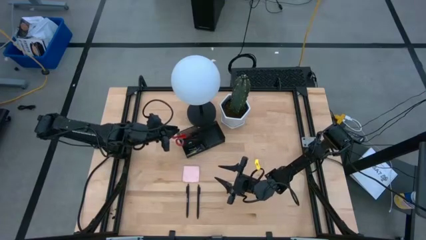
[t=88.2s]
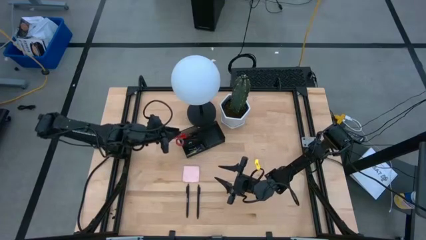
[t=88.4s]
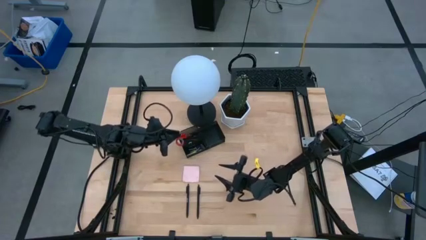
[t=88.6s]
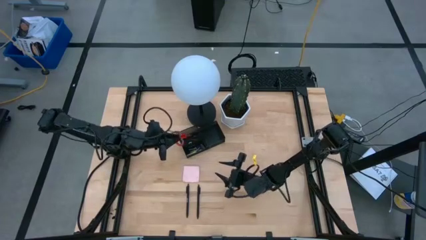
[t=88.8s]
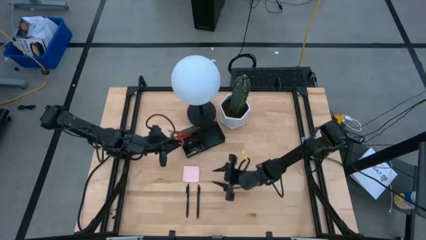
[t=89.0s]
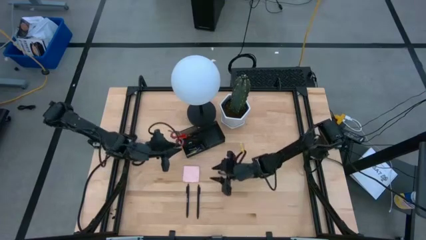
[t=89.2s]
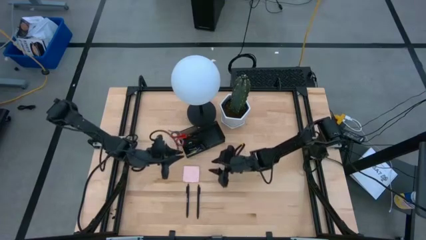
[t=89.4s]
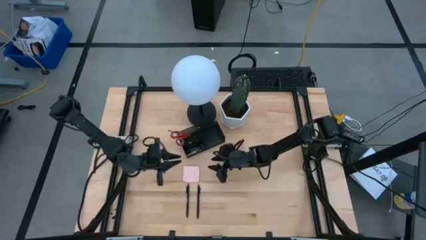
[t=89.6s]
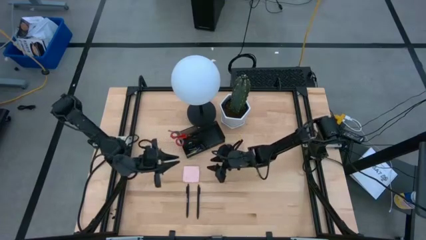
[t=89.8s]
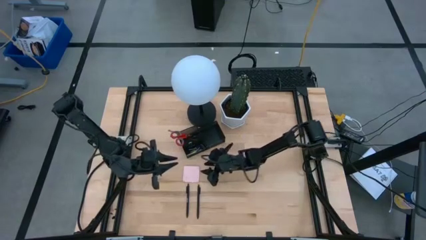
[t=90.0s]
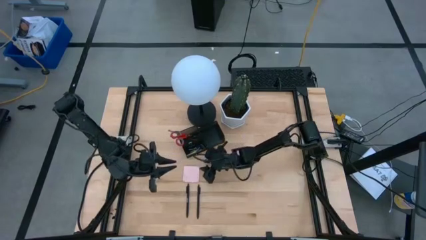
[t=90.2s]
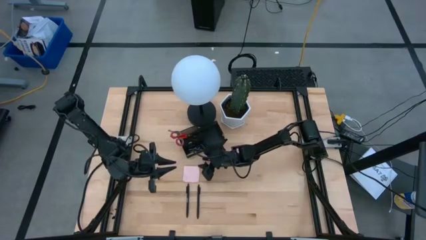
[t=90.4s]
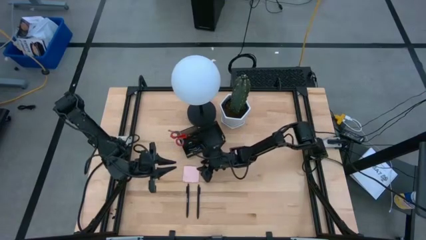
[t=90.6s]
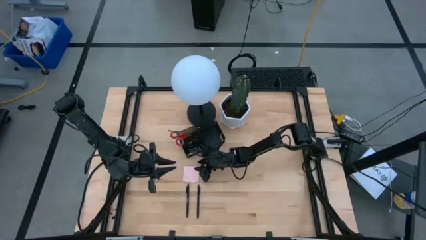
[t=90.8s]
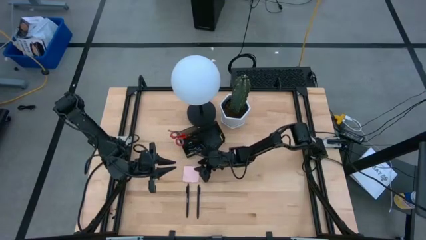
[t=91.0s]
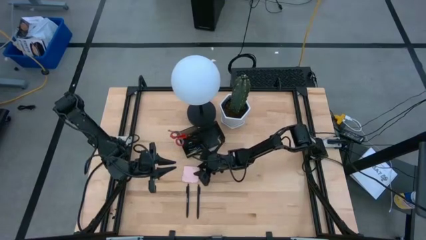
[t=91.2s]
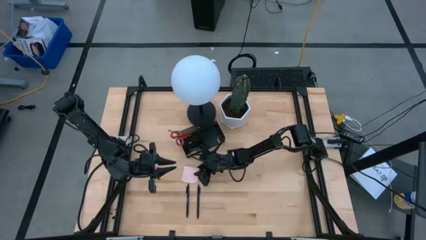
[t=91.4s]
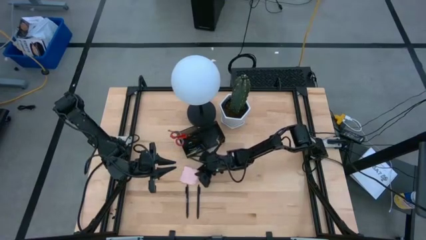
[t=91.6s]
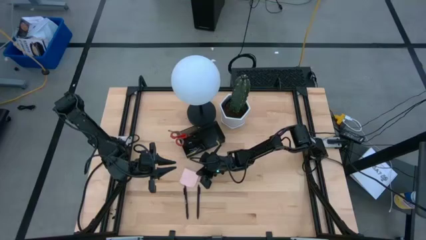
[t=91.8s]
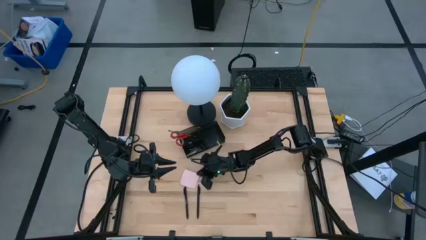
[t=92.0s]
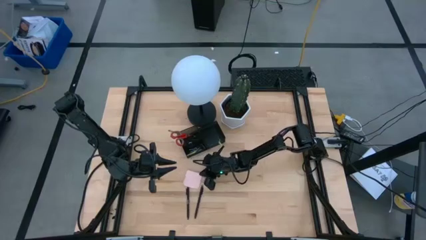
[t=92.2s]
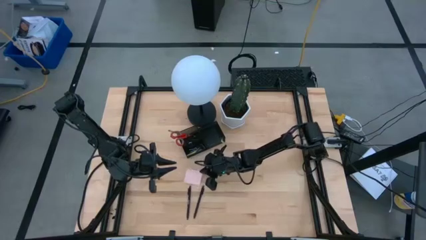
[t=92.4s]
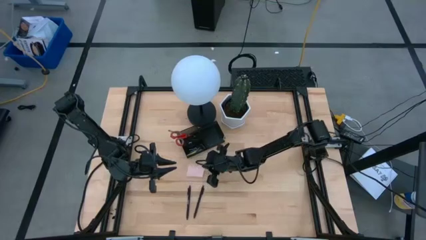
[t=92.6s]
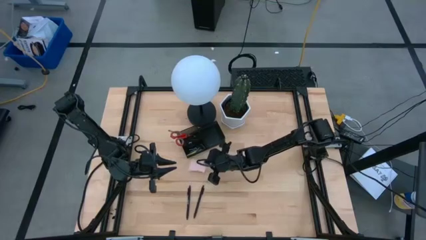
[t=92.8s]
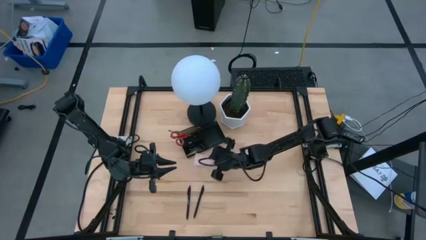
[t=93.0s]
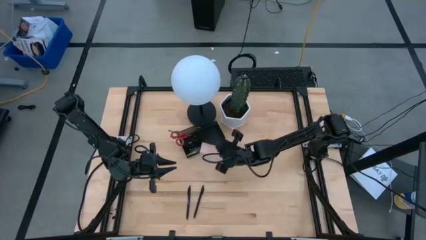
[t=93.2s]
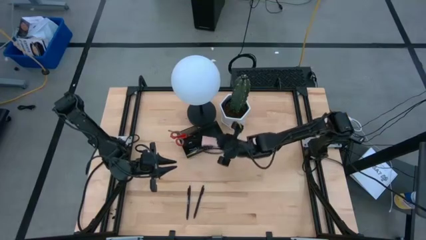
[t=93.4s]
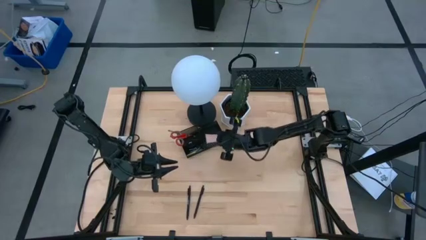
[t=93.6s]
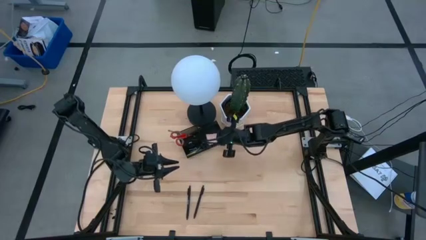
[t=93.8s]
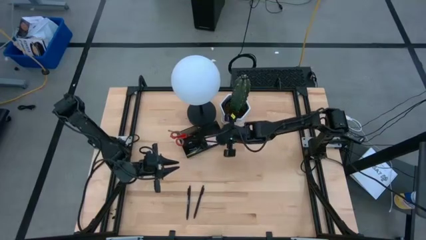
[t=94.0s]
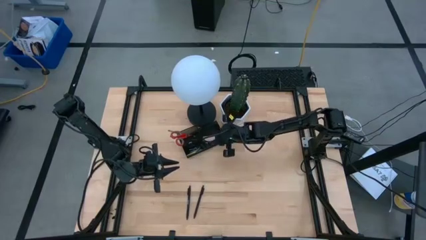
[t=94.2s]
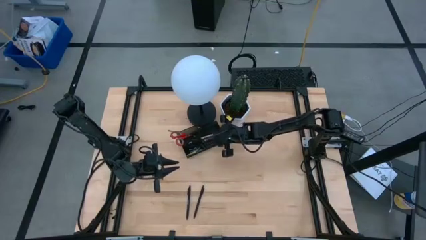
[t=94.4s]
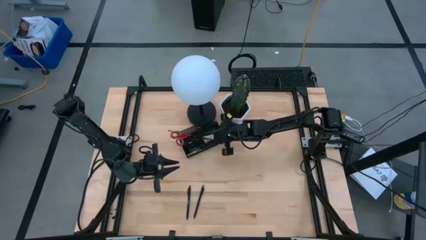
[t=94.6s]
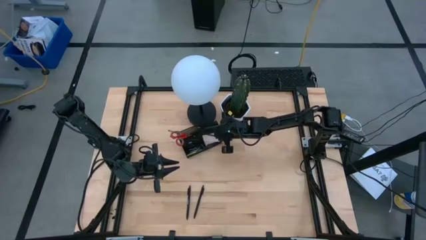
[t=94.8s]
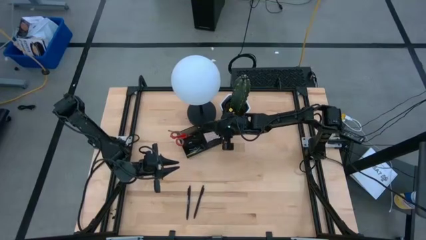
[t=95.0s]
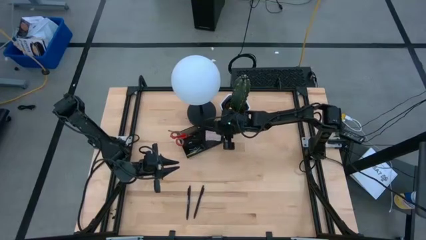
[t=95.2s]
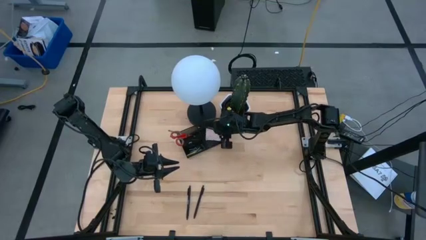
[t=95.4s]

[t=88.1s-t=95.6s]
Task: Pick and place office supplies into organizer
Put the pink sticky note into the desk organizer

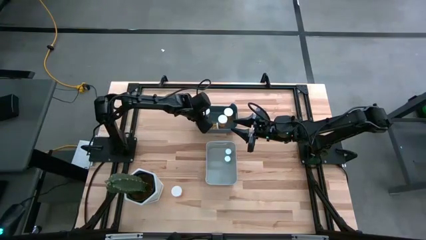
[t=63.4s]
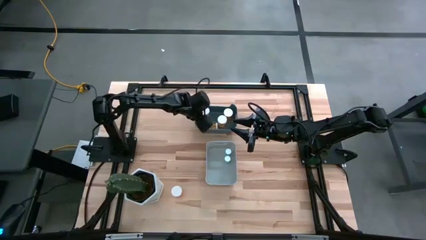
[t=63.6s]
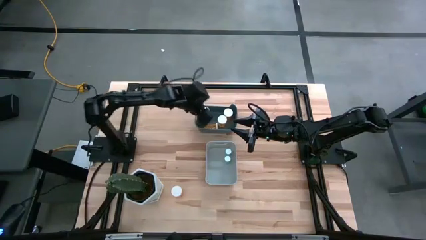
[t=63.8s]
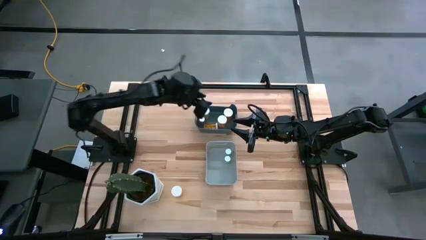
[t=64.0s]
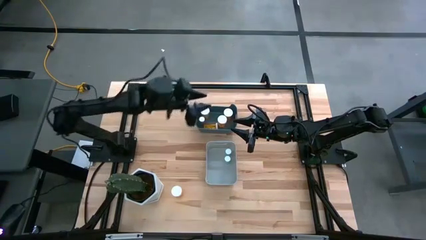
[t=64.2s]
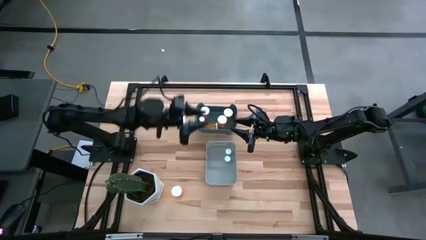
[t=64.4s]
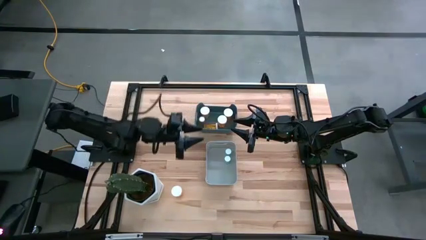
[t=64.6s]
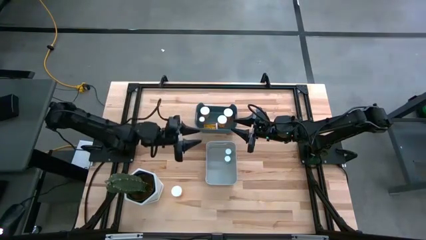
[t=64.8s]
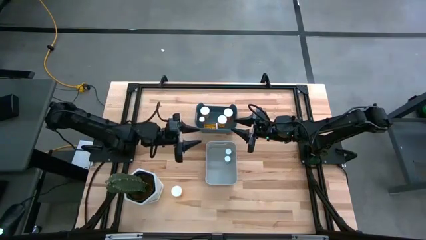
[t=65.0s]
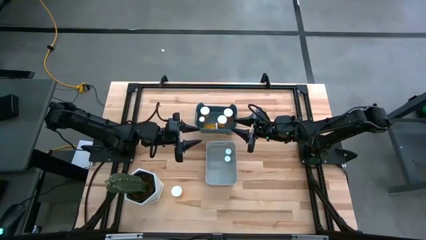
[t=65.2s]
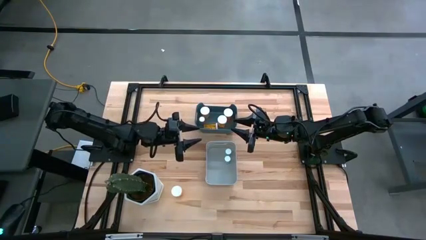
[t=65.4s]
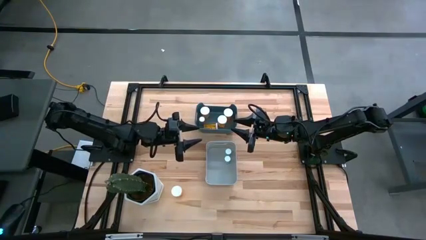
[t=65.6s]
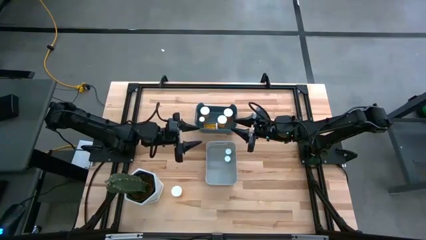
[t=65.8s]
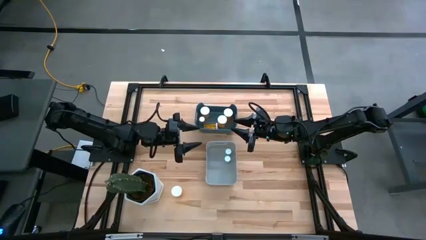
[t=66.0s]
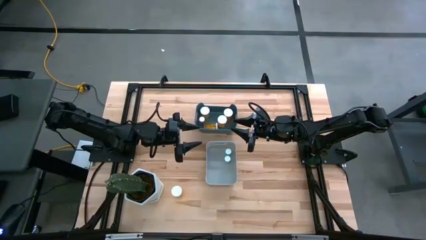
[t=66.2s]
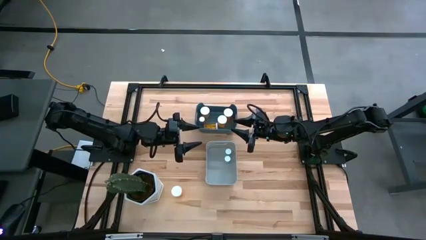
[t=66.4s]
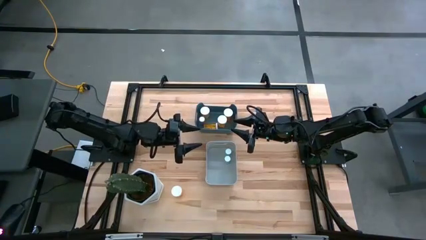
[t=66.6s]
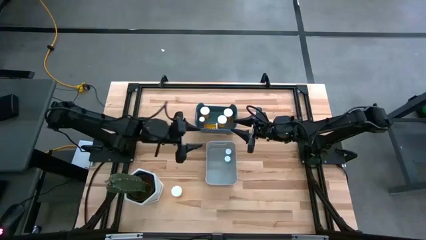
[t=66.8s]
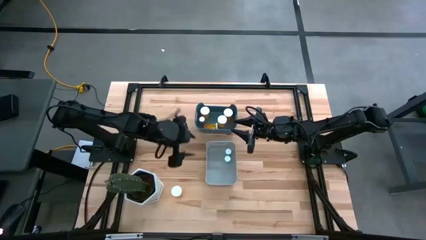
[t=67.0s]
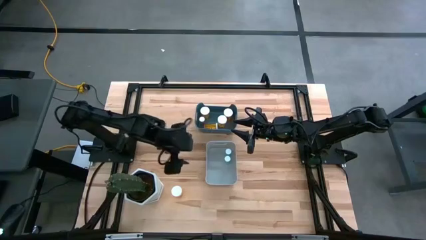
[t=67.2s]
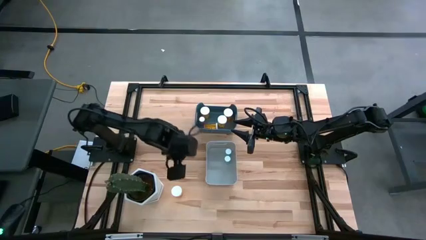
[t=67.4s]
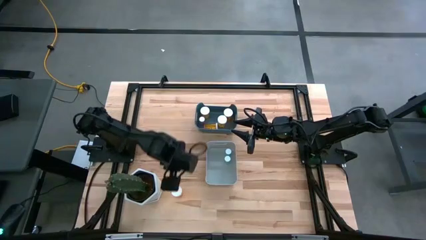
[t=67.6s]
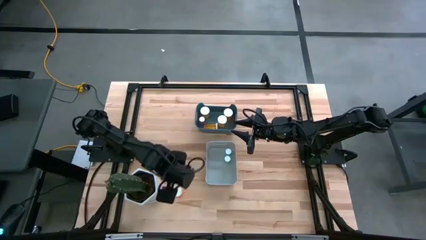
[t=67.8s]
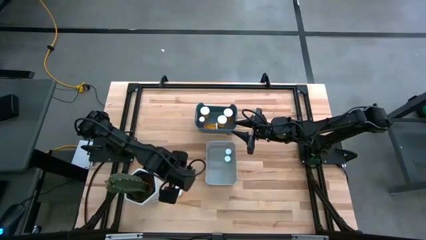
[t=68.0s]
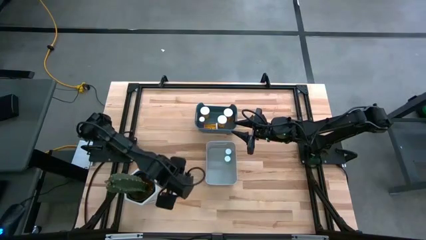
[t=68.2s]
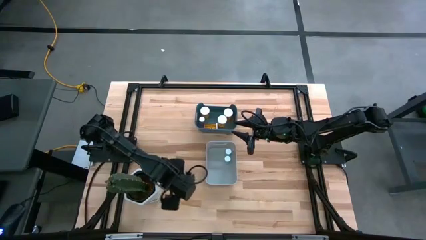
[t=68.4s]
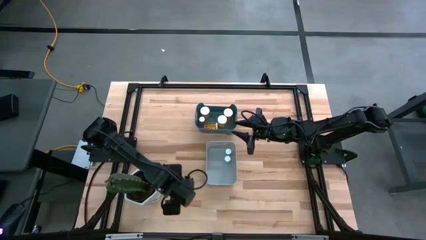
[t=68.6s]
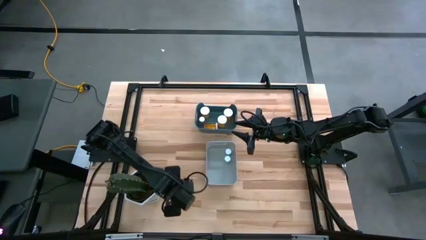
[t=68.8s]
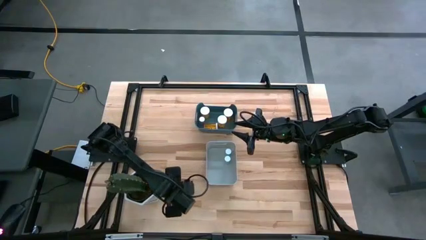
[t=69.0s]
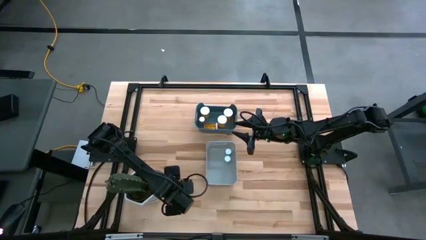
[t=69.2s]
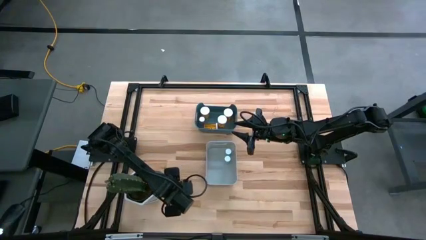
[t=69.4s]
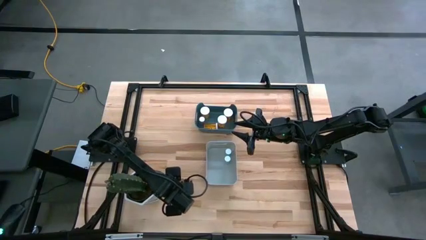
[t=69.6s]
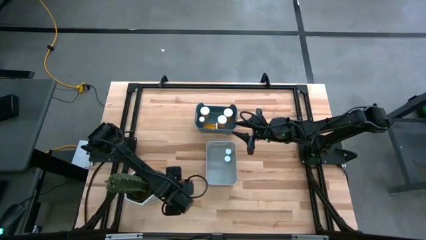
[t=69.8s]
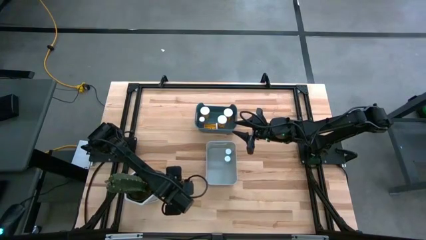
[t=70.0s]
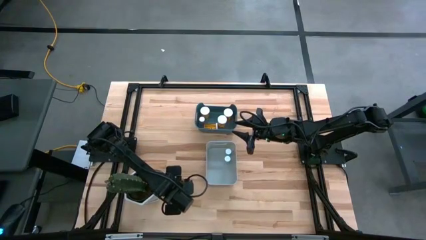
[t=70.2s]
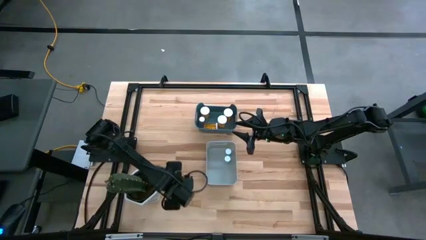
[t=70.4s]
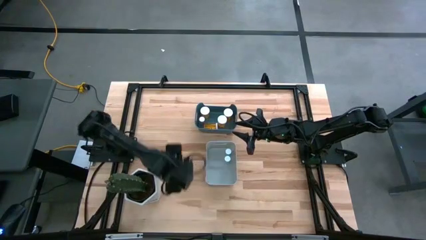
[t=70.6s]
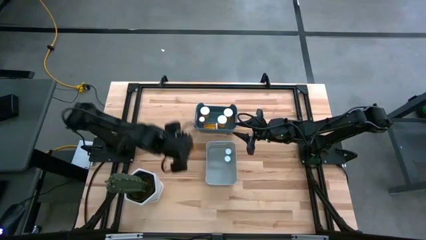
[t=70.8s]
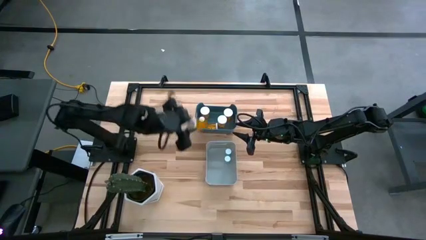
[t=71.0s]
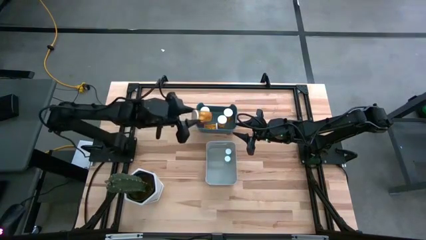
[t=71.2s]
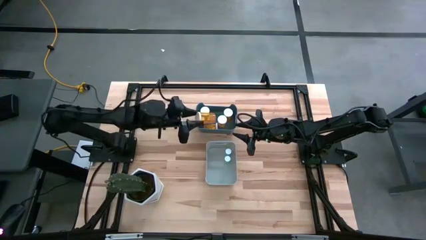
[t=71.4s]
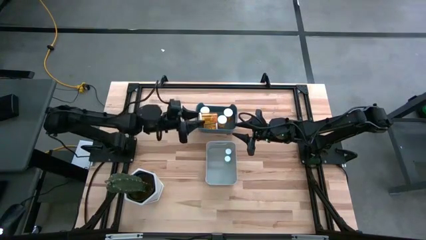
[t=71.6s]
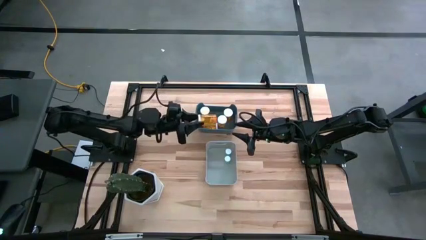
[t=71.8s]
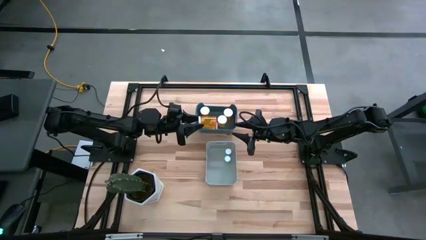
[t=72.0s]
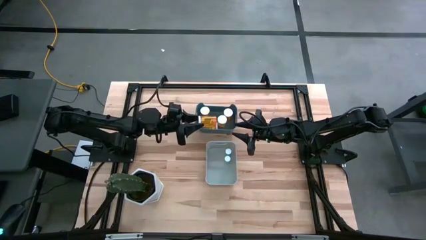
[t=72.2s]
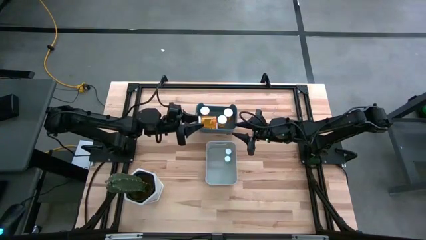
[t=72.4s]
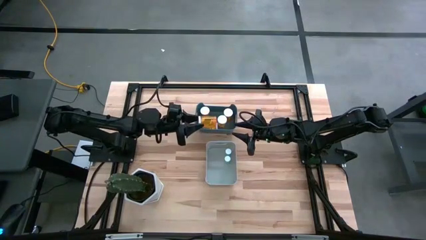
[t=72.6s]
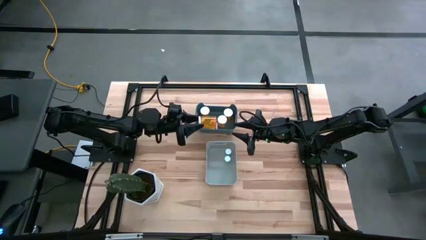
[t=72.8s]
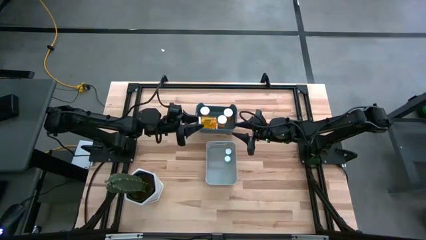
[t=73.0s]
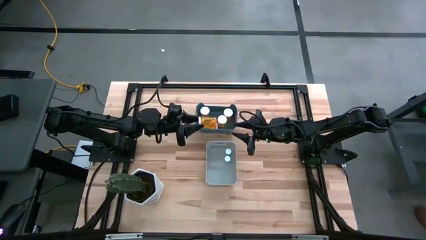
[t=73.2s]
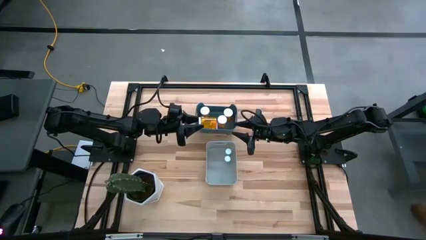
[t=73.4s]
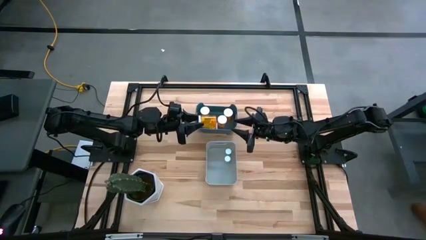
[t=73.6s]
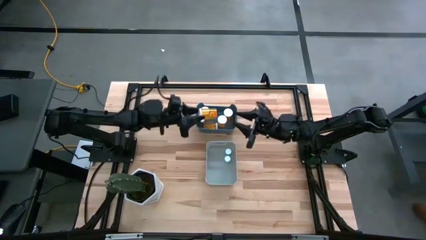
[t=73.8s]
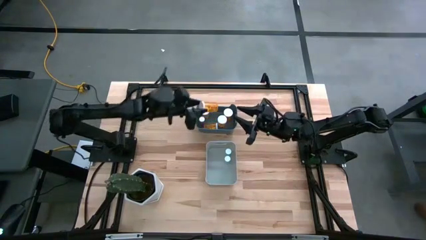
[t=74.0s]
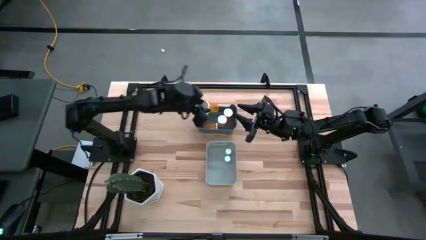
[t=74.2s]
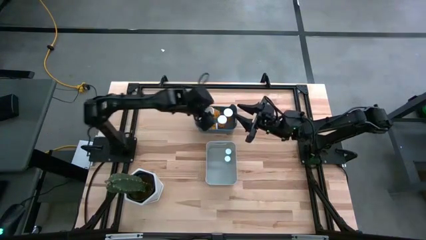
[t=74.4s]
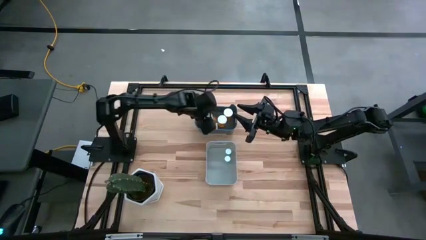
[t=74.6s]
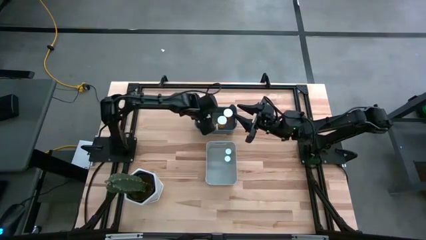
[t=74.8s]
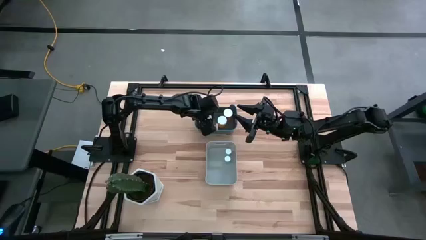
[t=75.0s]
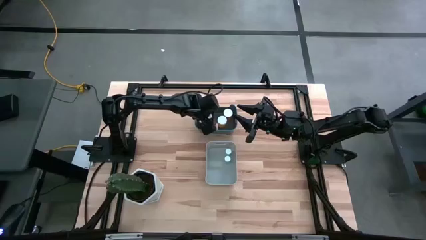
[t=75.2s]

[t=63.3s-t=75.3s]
Task: Pick and place medicine bottles into bin by pill shape (circle, oval)
Put the orange capsule bottle into the blue bin
